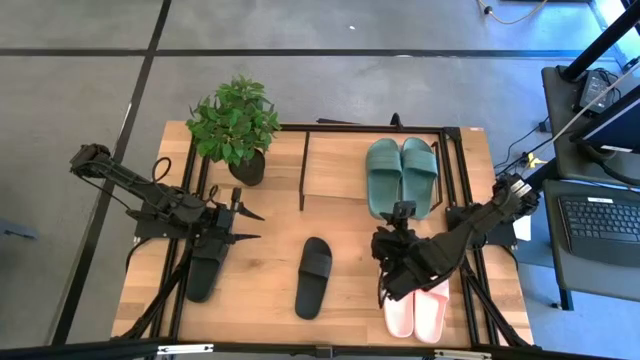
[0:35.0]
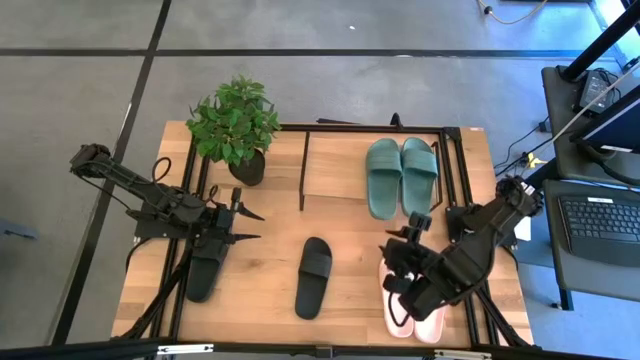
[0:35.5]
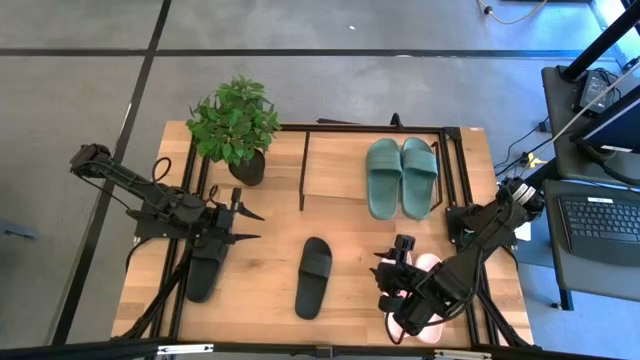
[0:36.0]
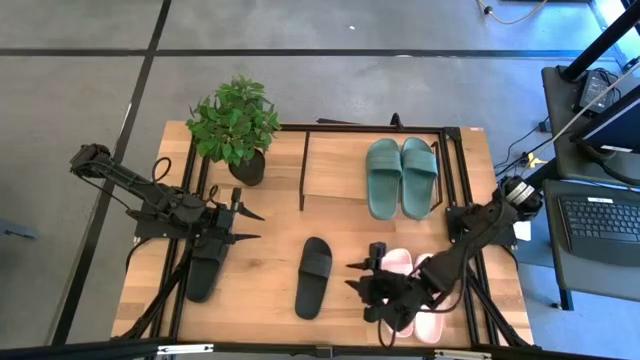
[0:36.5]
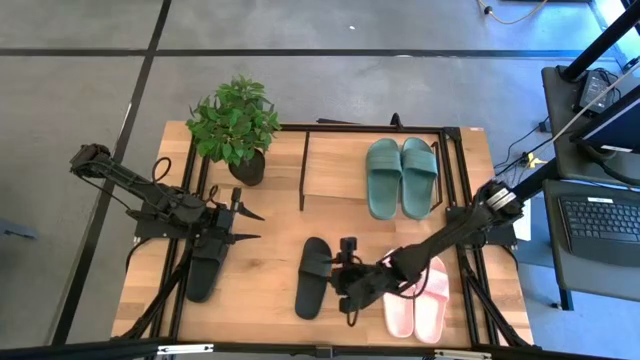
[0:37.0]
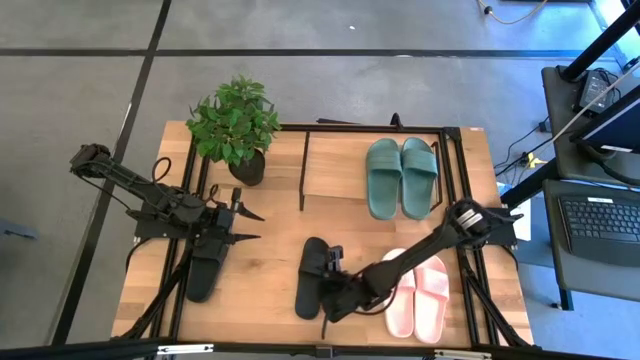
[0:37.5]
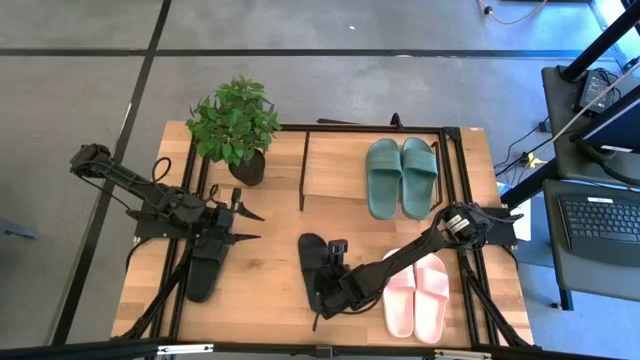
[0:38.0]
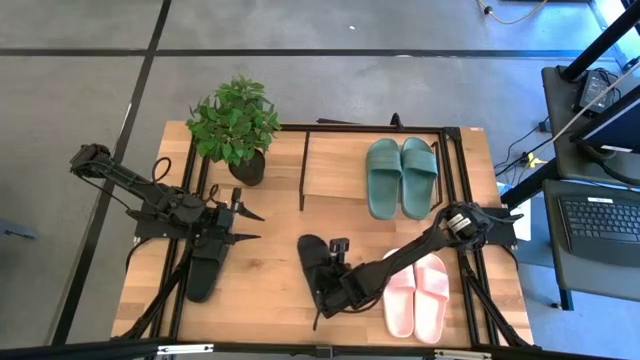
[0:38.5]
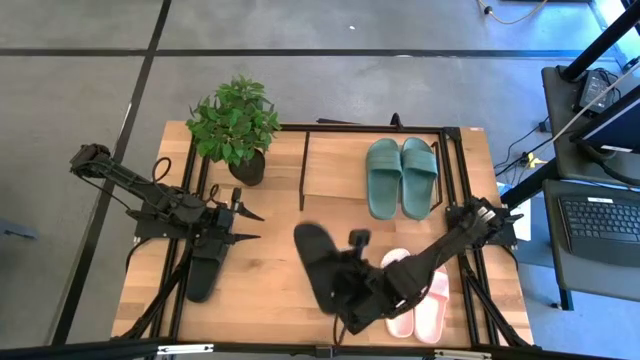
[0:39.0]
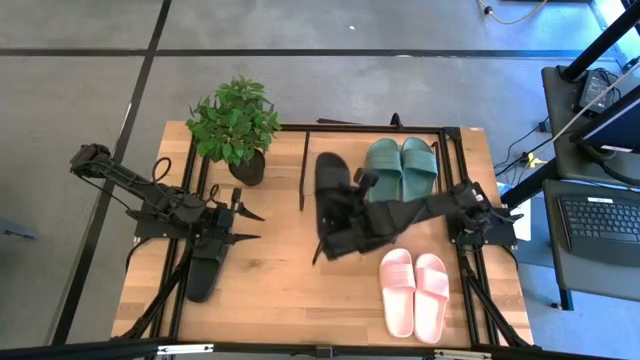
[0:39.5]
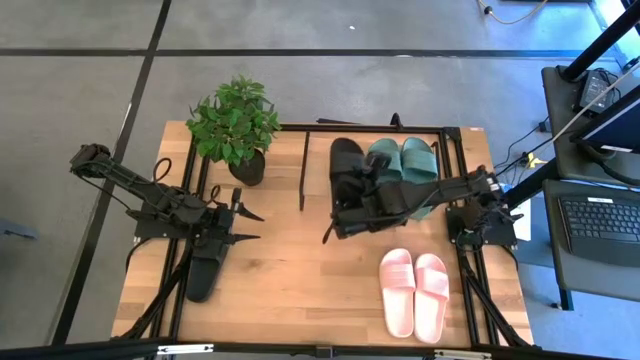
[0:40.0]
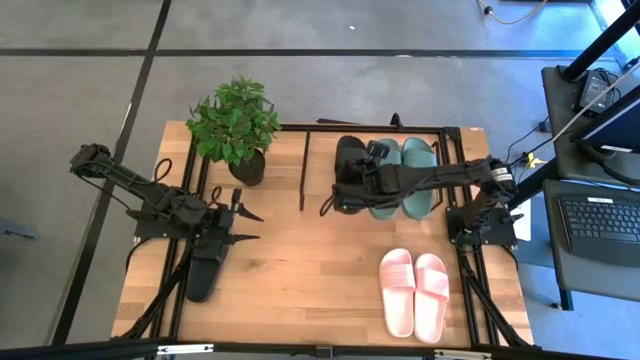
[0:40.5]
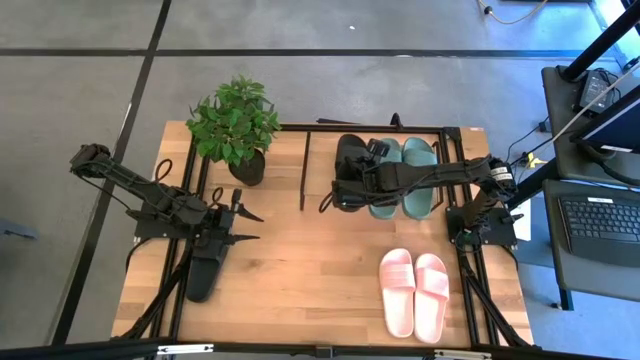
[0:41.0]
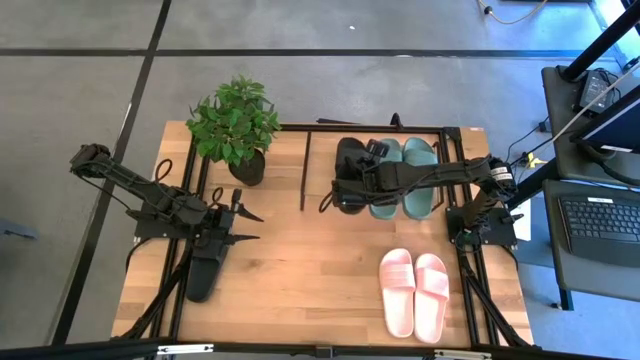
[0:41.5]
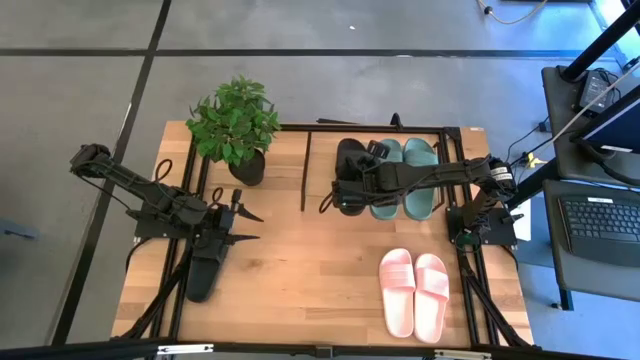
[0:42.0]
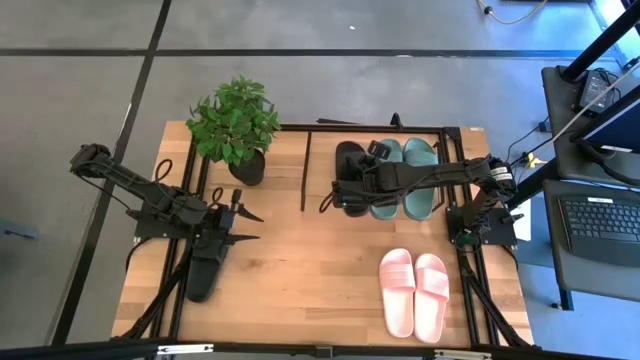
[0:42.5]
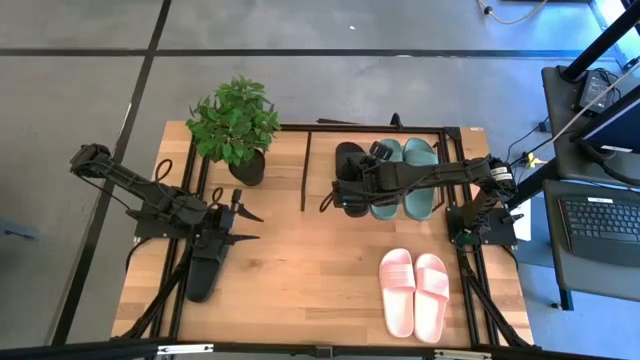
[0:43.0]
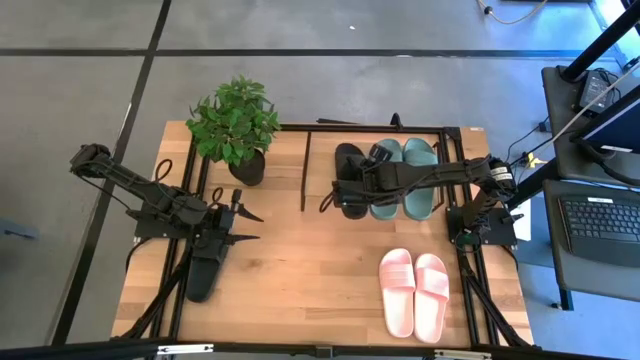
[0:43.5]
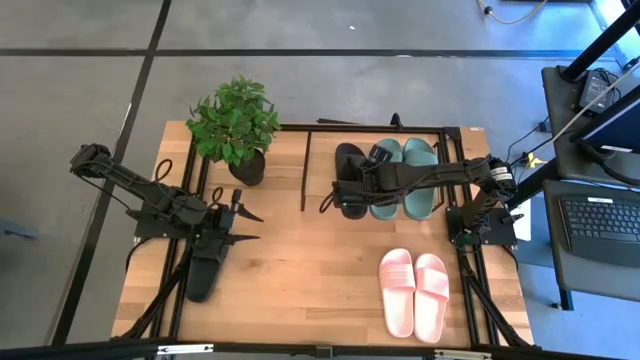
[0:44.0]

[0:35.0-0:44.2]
Task: Pick and place slides into the shelf
Put the right black slides on the shelf

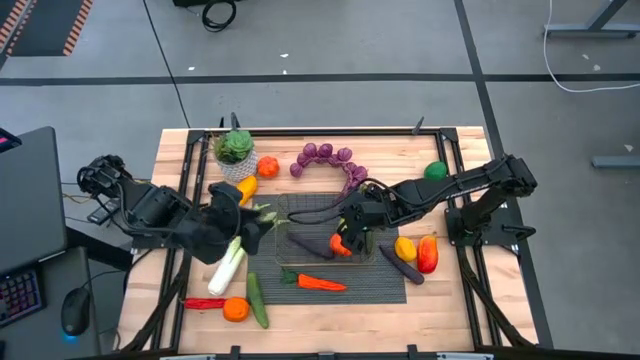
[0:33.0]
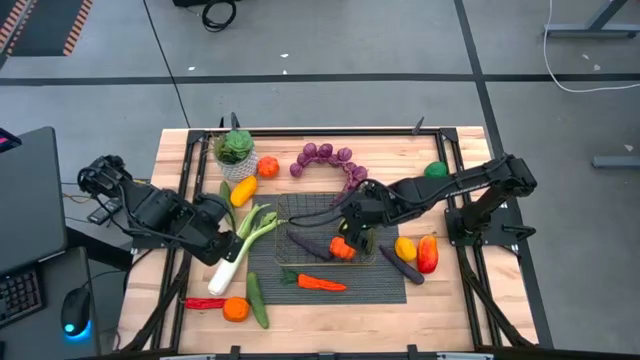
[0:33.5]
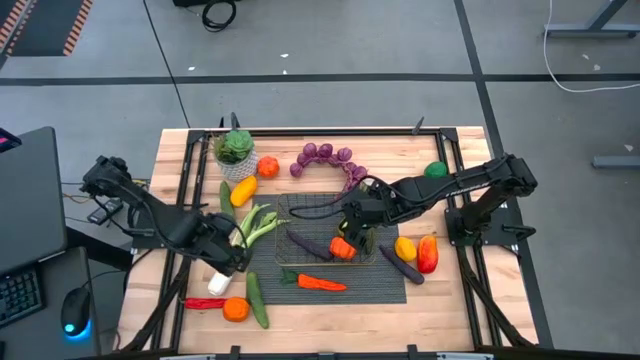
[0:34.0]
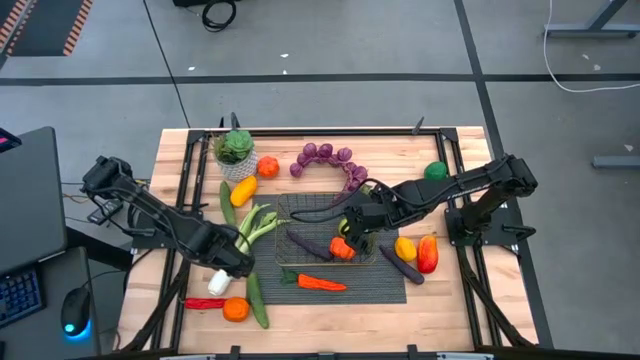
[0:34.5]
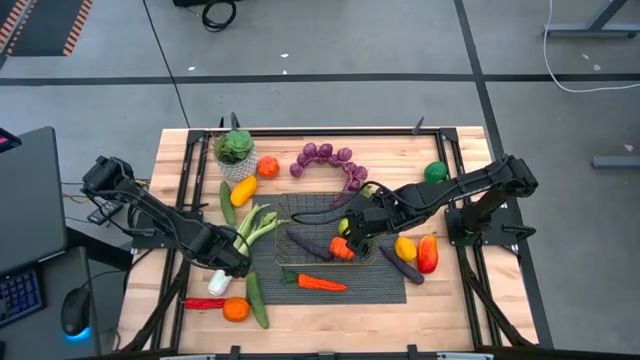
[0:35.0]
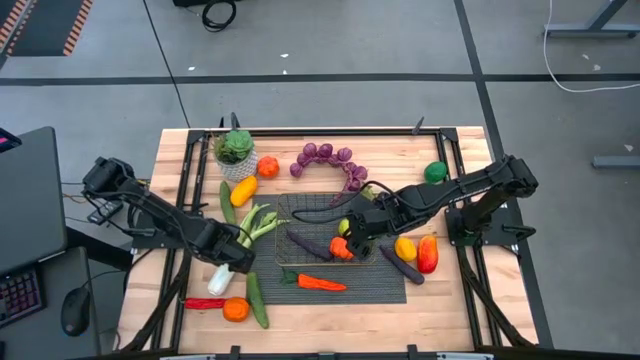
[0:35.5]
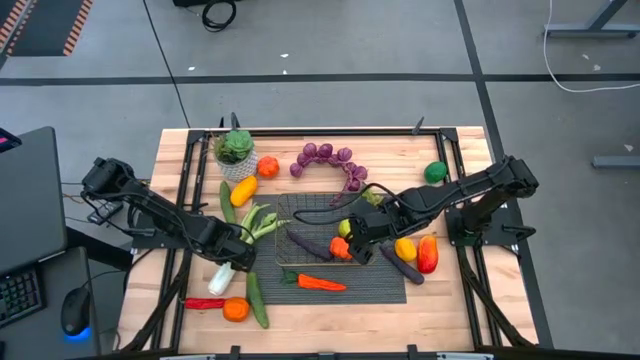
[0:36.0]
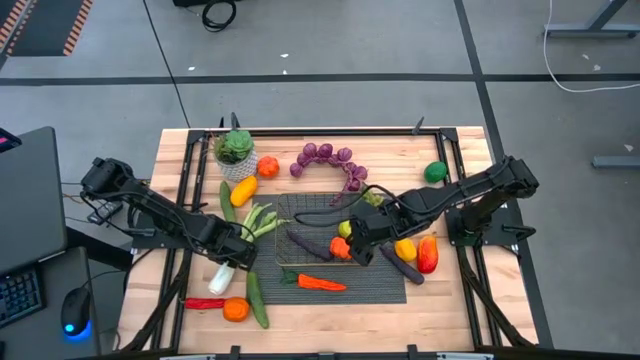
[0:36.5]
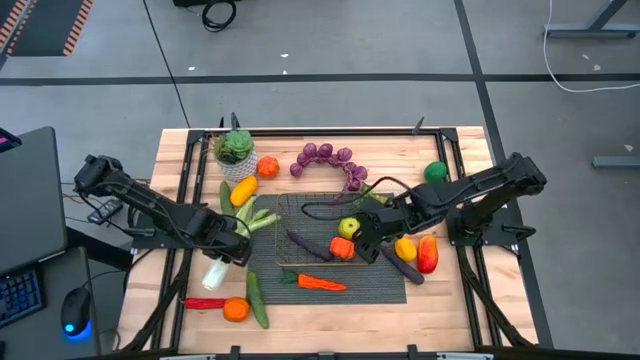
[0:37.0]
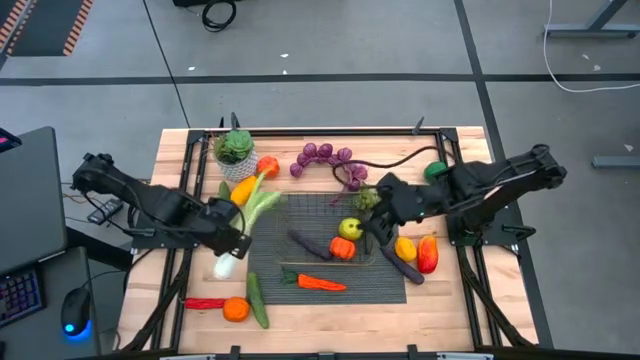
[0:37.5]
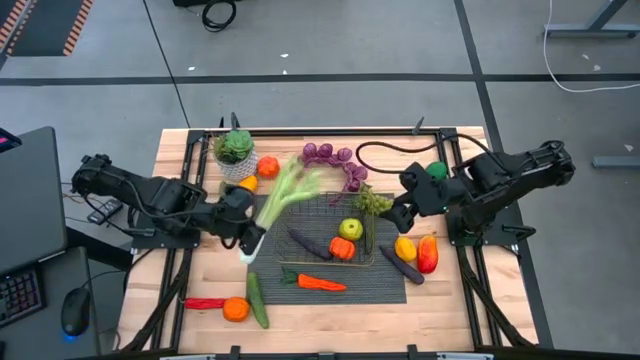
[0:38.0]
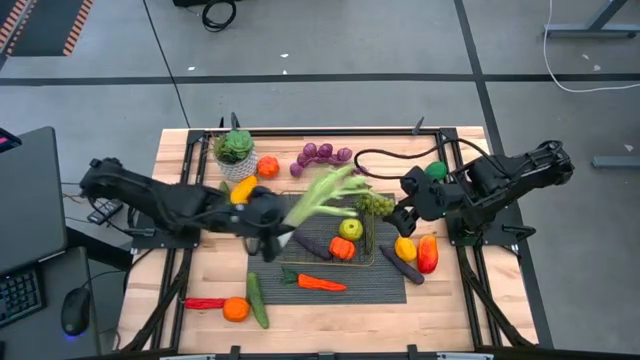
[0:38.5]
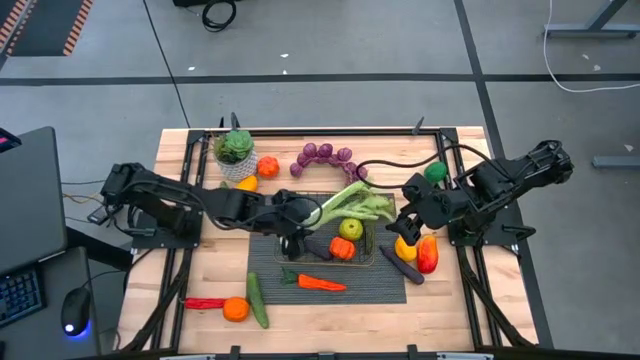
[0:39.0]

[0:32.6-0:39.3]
Task: Build produce basket
Put the green celery into the gold wire basket

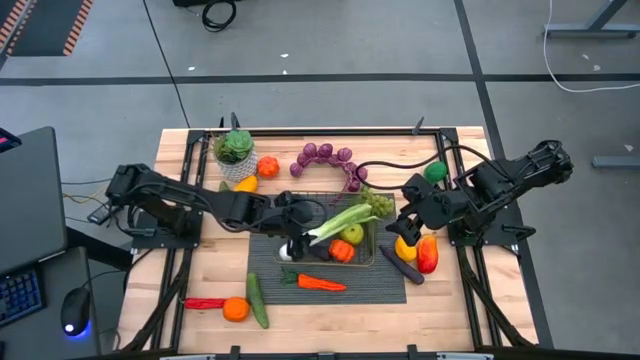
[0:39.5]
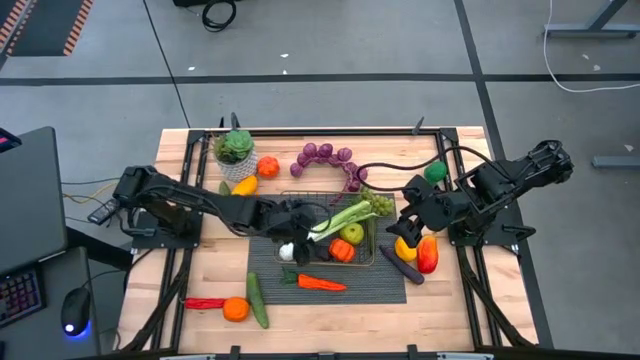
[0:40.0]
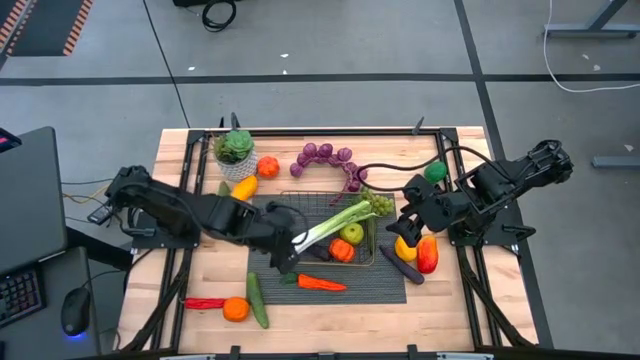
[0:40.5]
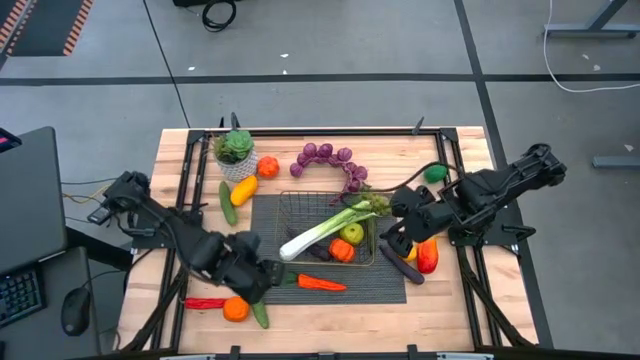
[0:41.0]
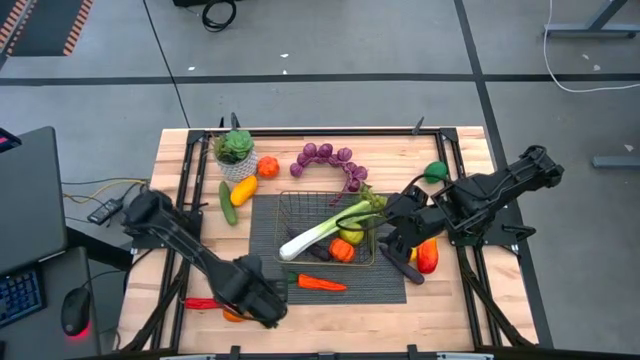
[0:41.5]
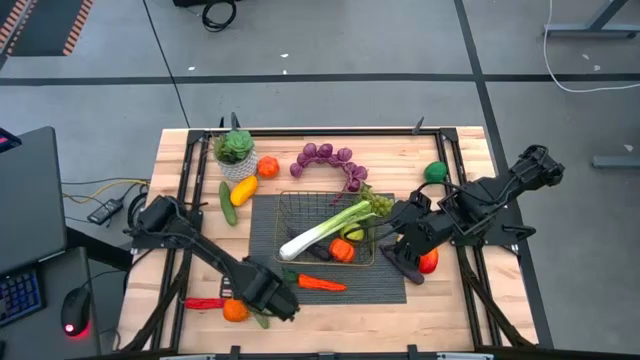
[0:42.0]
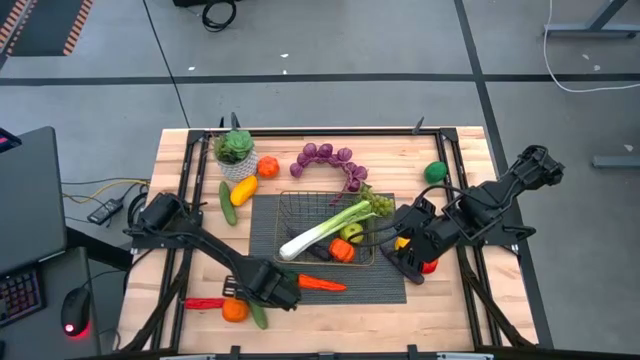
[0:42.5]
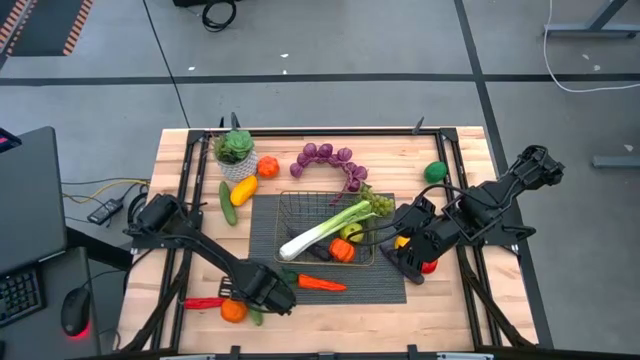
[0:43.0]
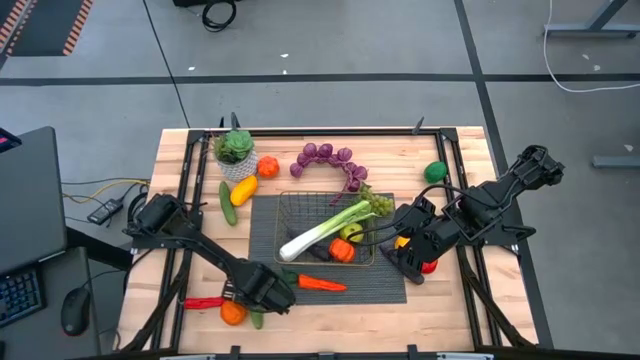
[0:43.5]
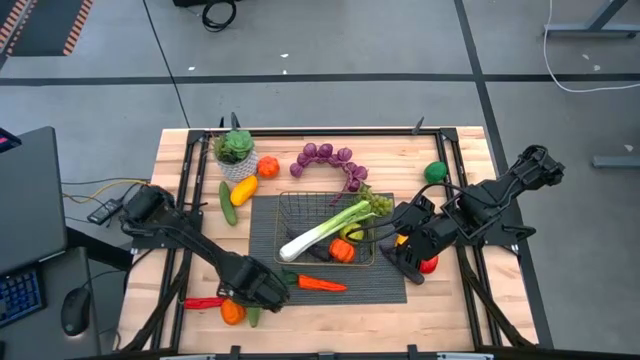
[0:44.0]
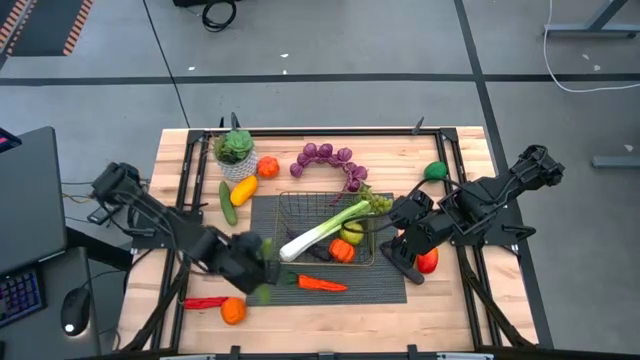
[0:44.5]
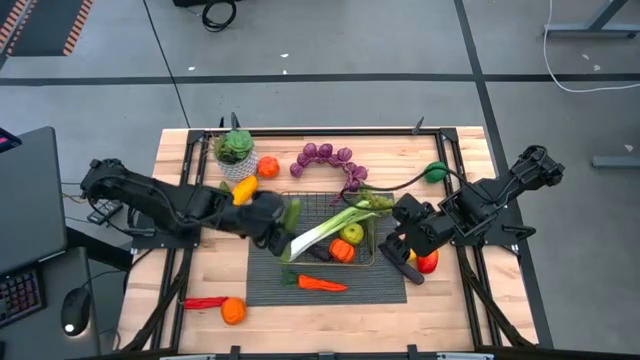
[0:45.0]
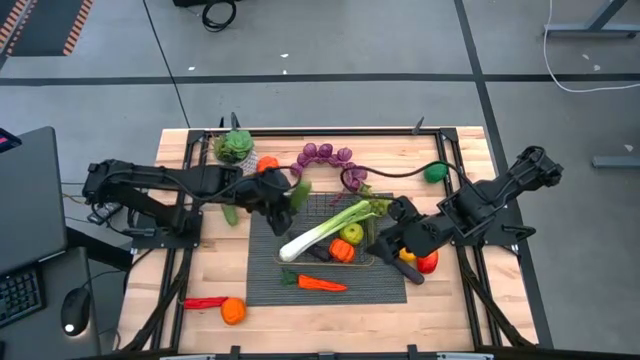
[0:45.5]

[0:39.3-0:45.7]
Put the bottom green cucumber into the gold wire basket
